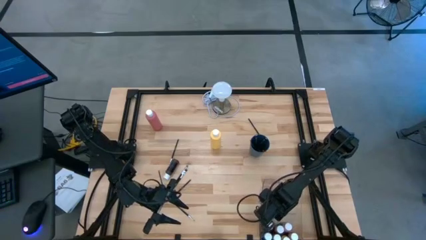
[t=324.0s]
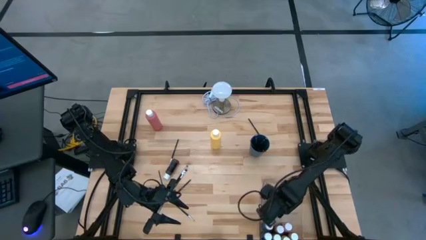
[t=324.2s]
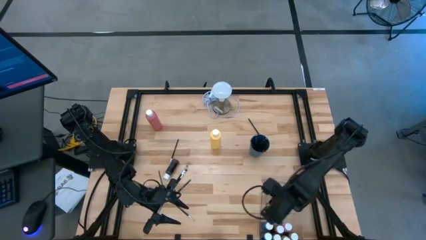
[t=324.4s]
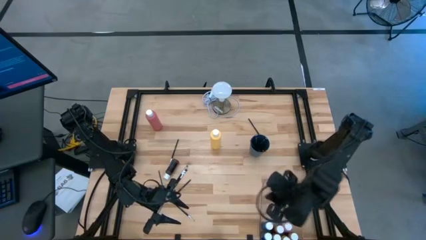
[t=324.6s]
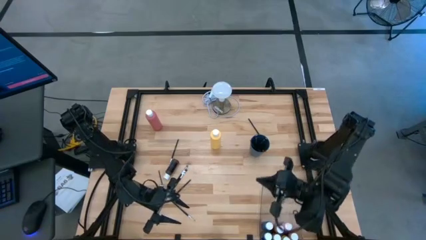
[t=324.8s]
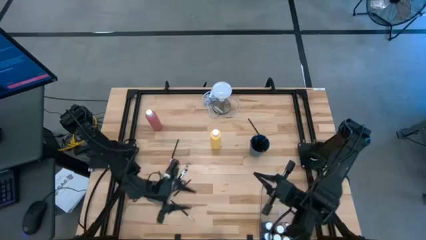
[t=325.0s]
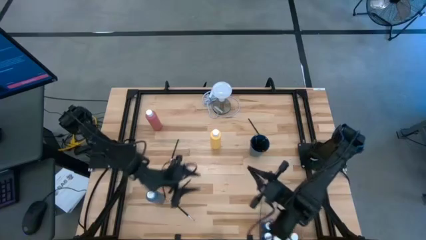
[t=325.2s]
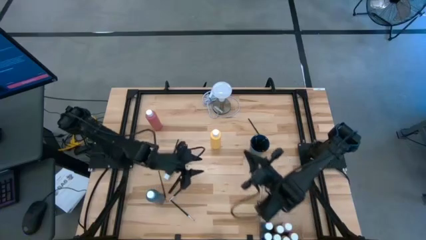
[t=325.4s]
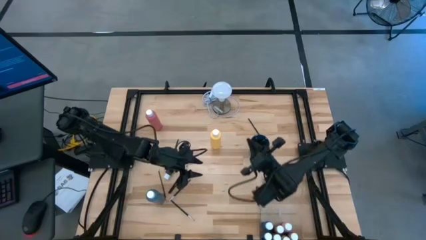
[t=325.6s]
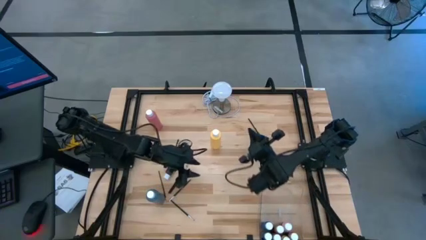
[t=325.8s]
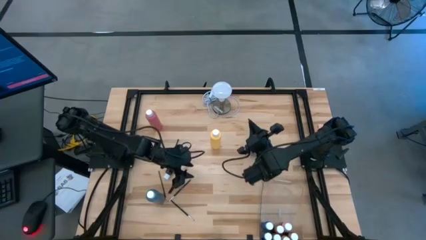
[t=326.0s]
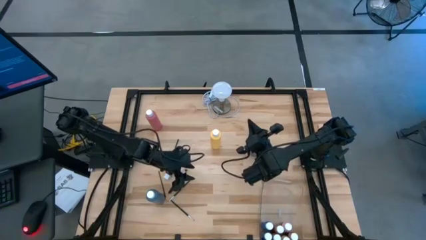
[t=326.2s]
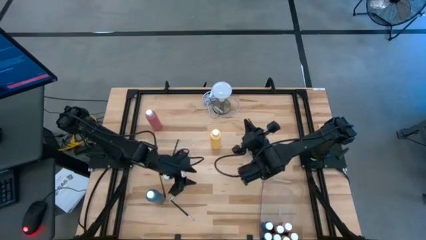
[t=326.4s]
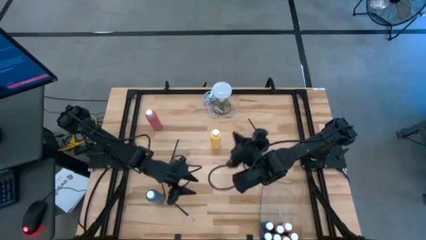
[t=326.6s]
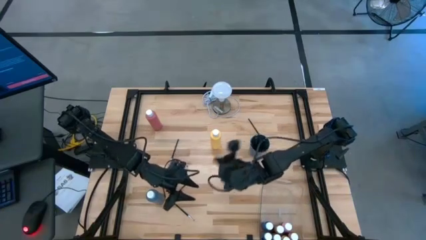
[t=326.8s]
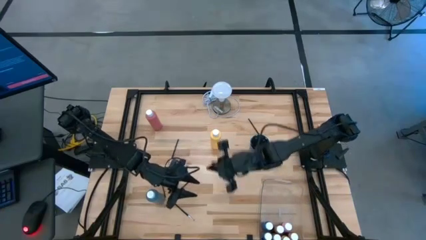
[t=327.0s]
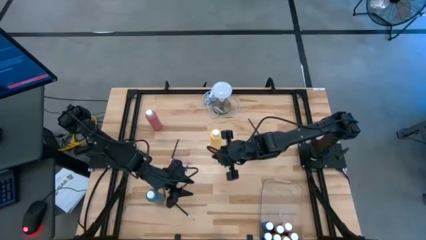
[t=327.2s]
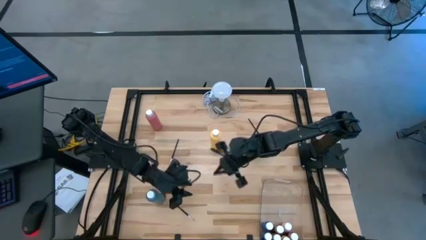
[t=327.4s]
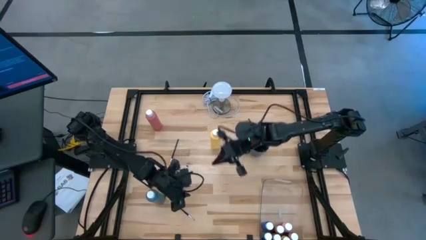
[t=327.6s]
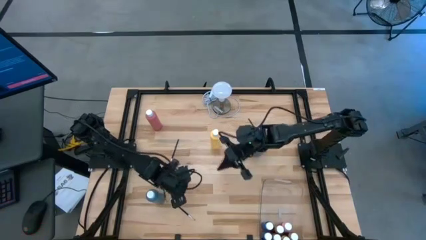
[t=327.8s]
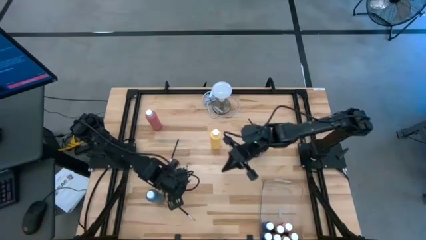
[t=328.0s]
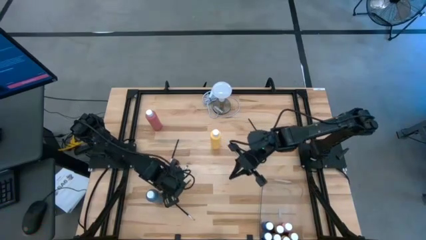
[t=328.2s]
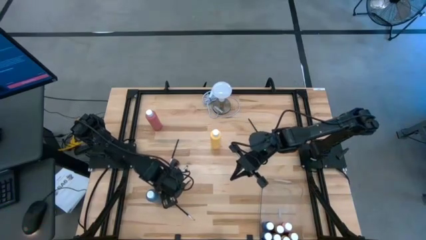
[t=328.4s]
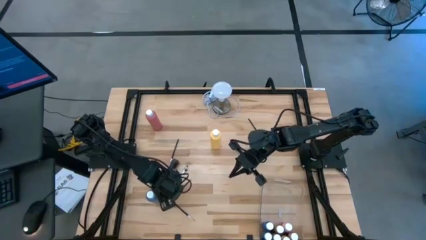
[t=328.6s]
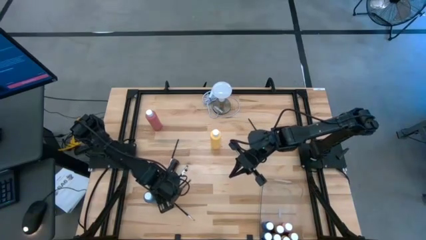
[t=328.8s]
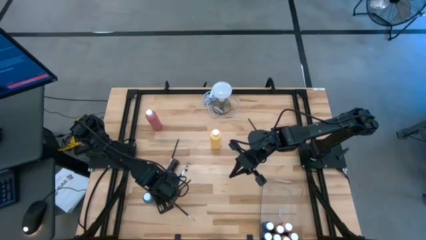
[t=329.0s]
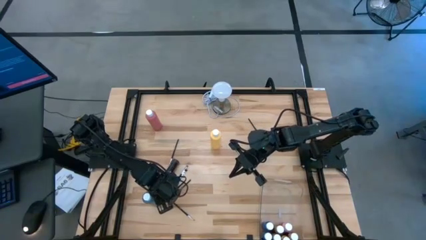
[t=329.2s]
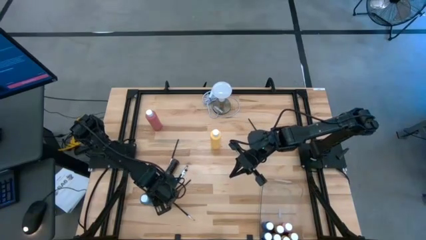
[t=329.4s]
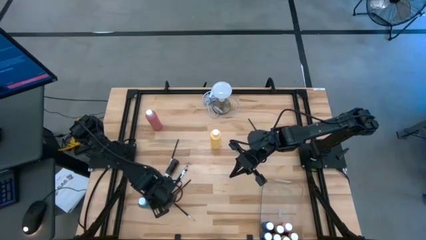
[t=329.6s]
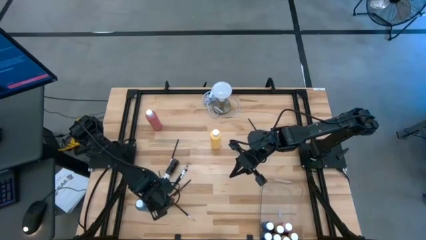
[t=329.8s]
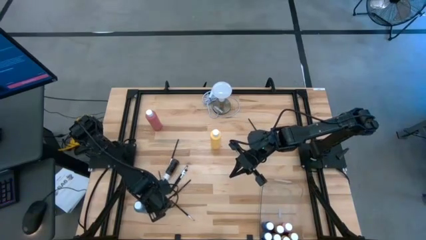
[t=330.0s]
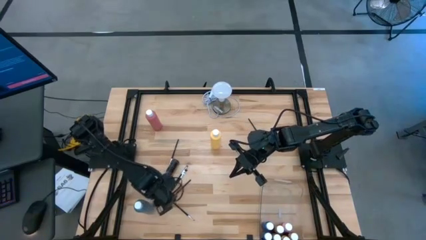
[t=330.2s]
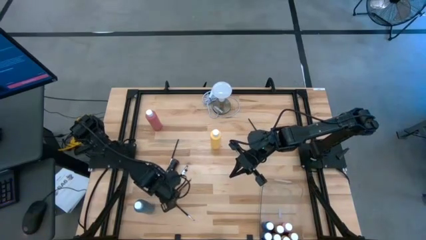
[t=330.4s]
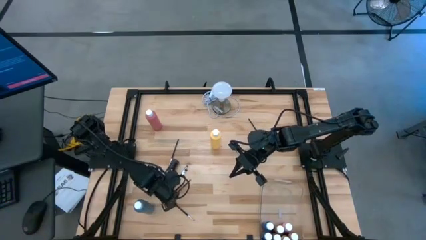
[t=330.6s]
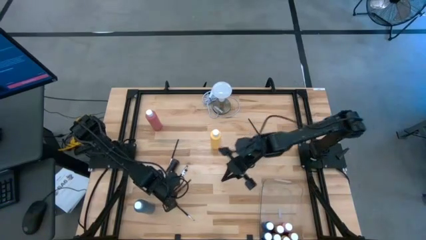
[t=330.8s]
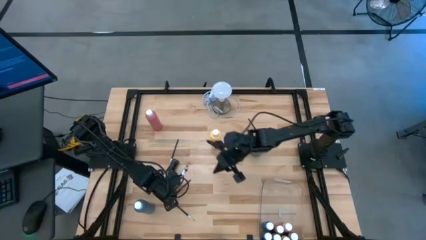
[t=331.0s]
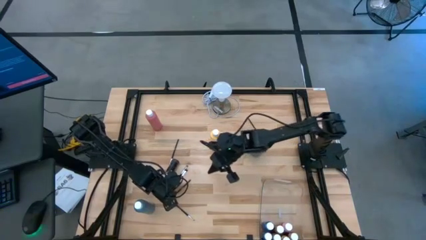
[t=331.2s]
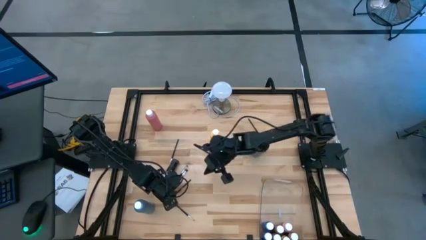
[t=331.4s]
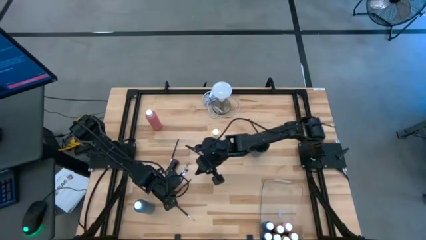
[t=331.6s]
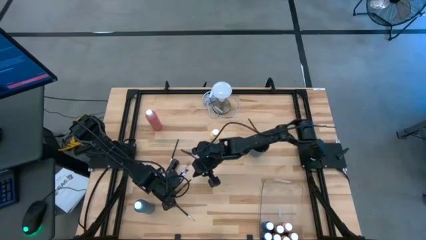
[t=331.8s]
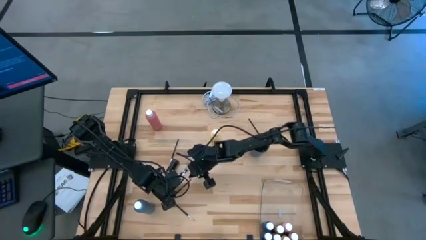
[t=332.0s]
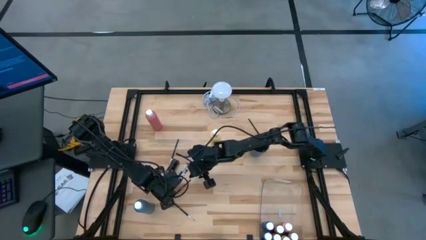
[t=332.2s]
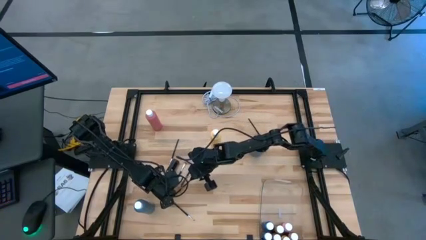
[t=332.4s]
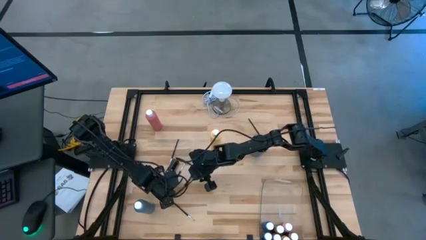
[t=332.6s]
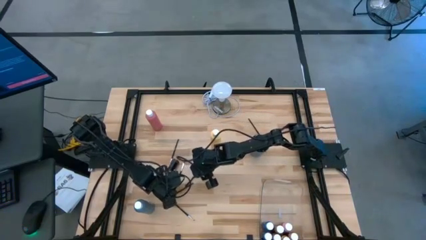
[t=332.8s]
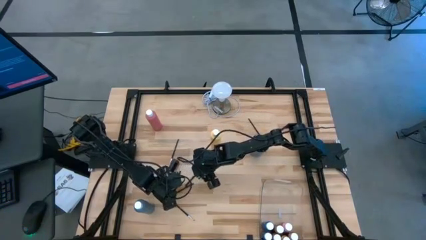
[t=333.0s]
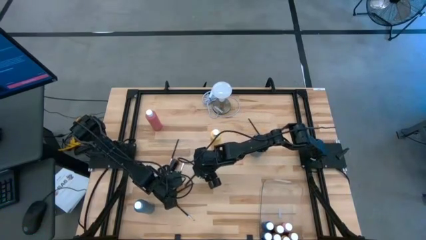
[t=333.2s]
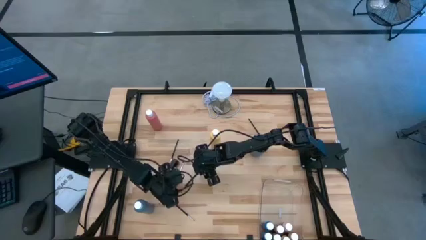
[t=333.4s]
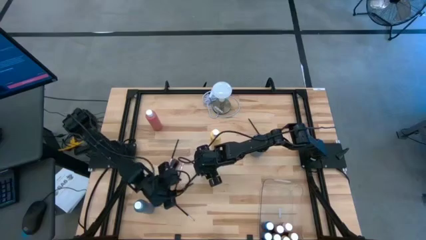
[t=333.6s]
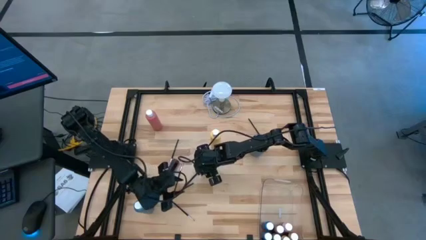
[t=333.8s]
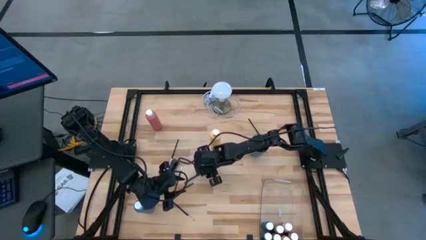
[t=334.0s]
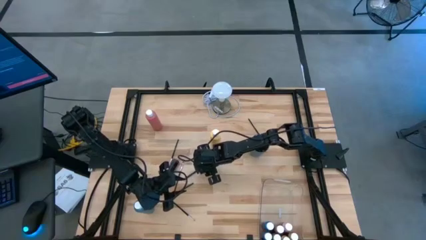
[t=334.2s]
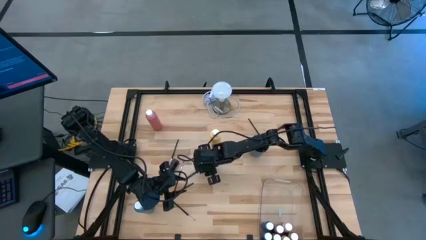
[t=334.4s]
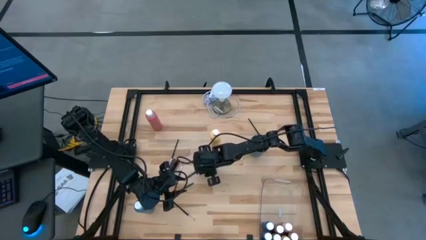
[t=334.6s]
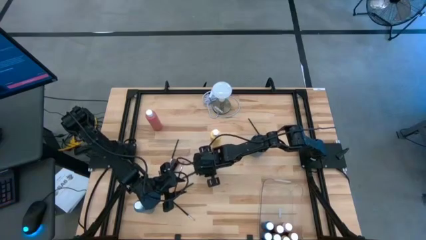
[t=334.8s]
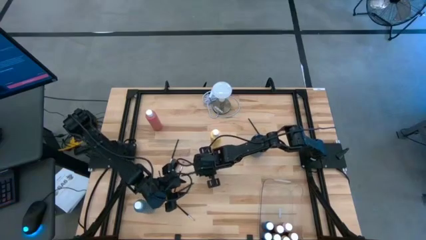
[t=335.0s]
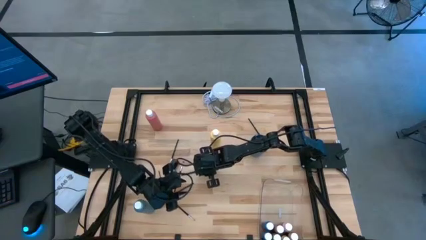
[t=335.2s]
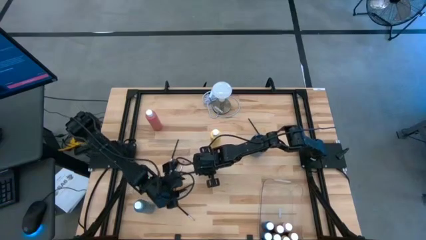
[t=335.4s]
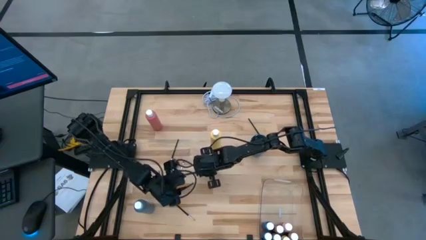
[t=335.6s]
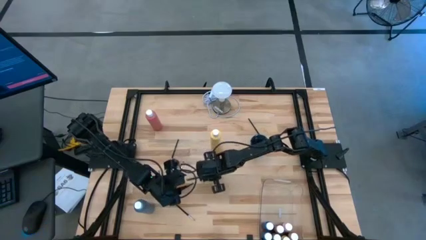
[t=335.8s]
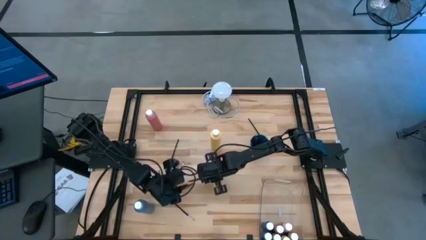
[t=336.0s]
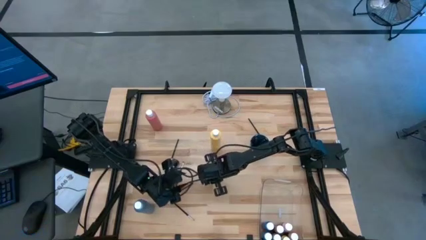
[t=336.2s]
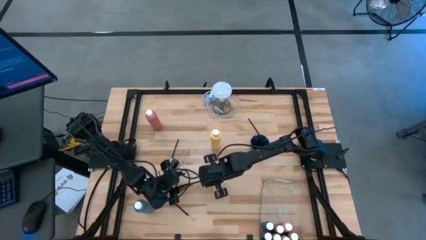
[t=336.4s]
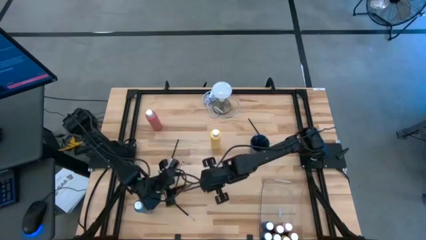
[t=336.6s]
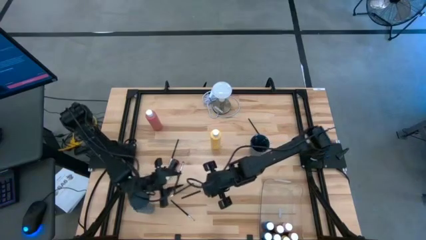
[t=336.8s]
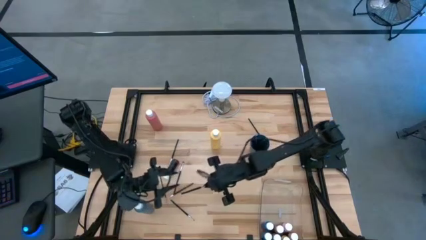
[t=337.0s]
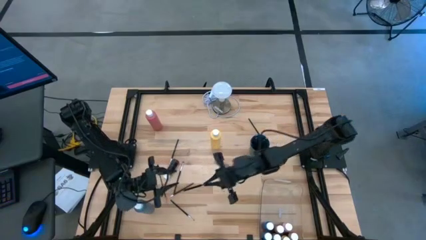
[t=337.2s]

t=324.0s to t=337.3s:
Task: Pick & Place Paint Supplies
Put the black silver paintbrush into the blue cup

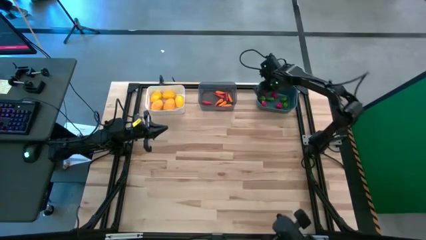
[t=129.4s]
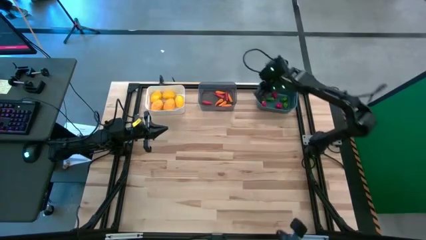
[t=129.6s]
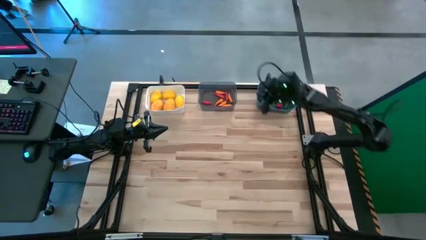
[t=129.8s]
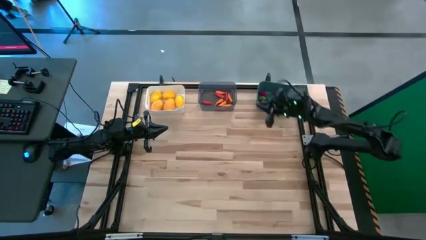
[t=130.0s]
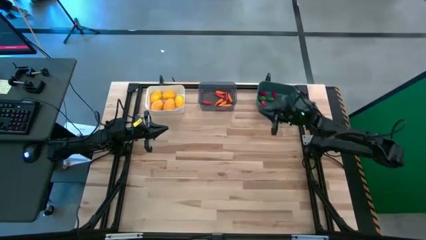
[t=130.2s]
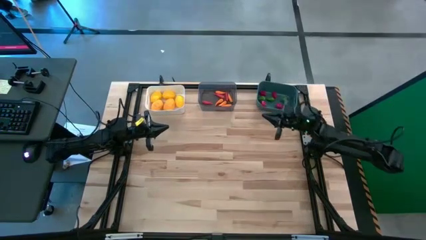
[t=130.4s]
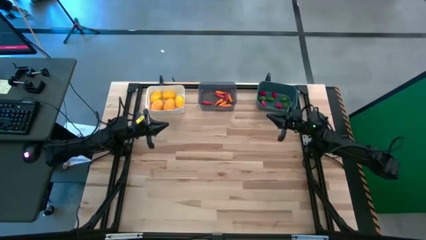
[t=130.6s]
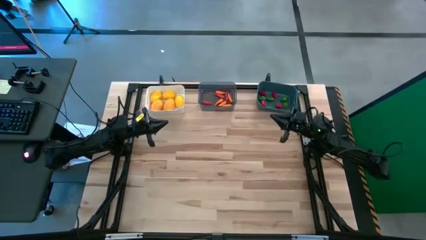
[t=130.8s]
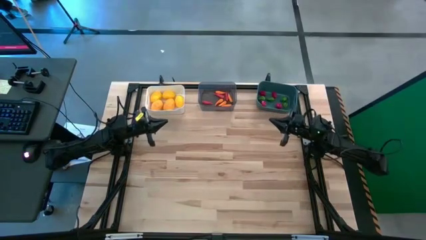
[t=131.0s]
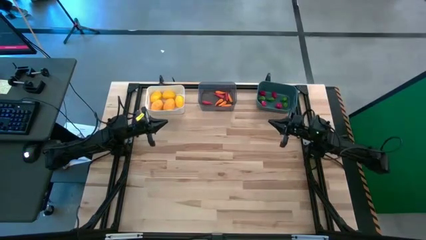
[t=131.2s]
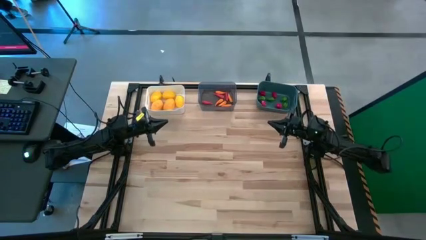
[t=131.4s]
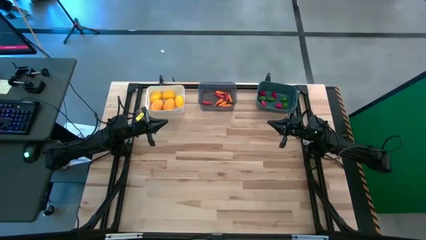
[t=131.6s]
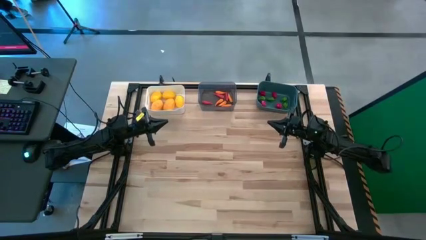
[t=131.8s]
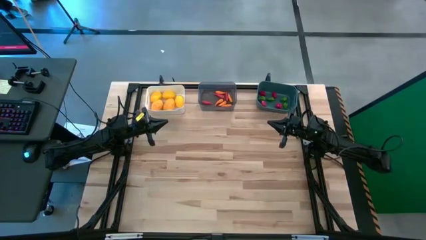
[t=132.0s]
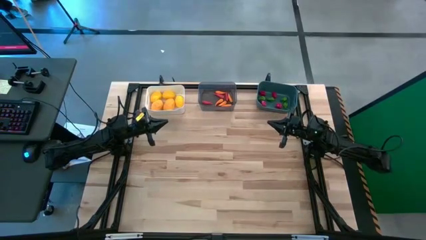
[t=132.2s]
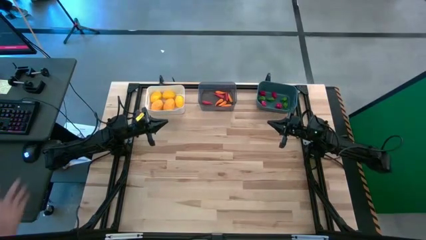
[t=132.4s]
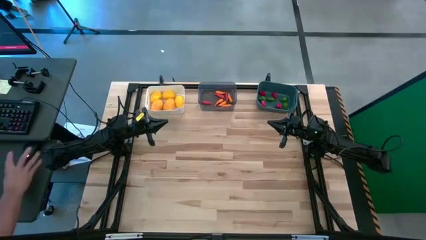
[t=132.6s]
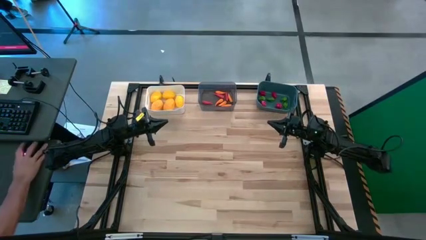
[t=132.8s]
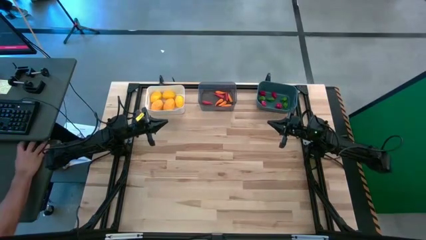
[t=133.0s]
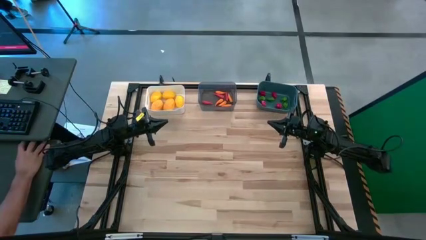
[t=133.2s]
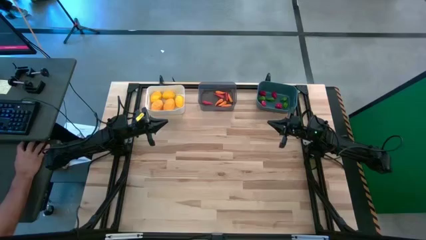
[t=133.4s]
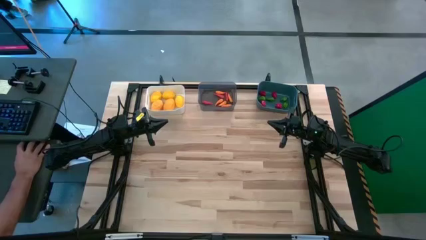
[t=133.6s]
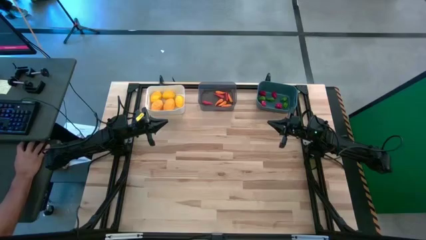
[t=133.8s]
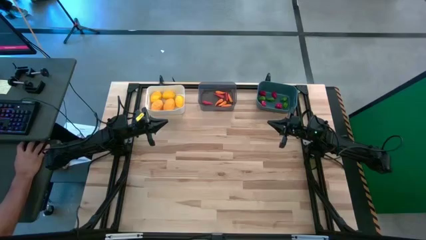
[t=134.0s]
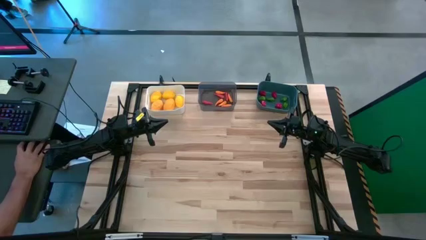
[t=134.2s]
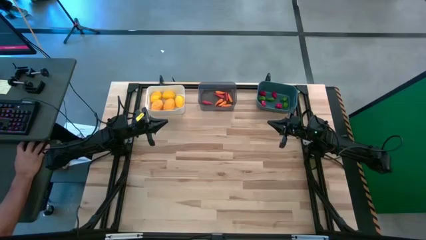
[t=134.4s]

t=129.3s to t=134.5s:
Task: Sort produce into baskets
Return to Home Position
